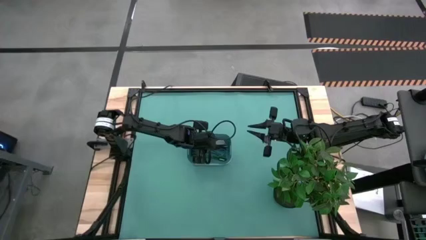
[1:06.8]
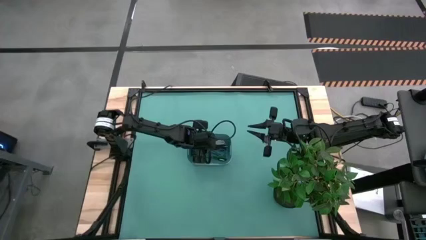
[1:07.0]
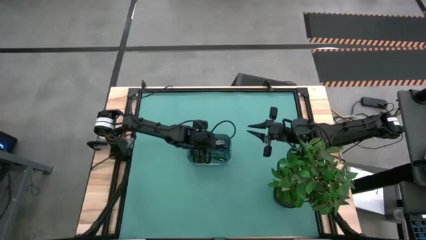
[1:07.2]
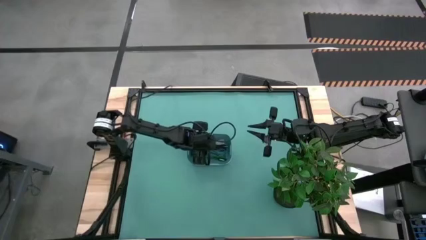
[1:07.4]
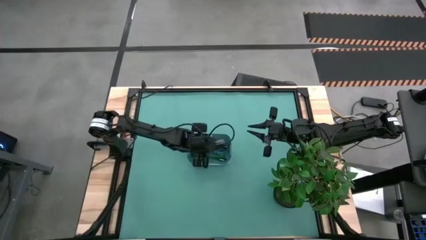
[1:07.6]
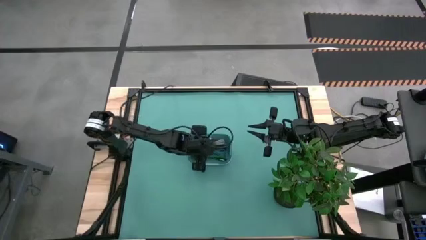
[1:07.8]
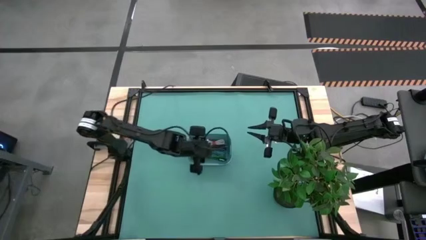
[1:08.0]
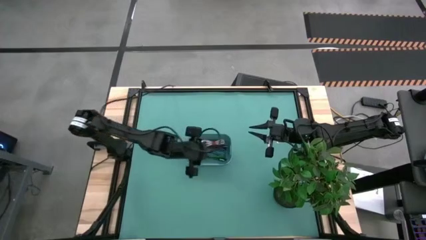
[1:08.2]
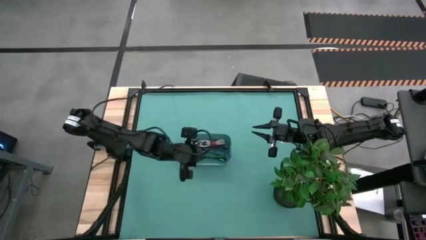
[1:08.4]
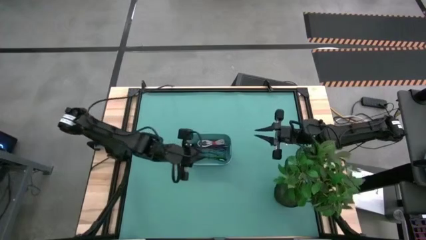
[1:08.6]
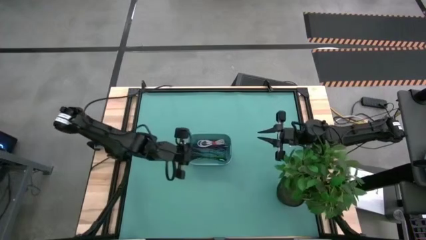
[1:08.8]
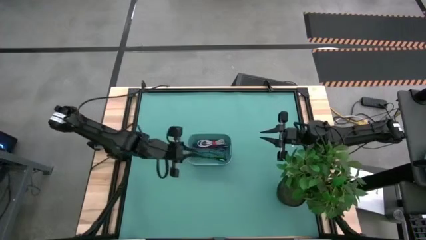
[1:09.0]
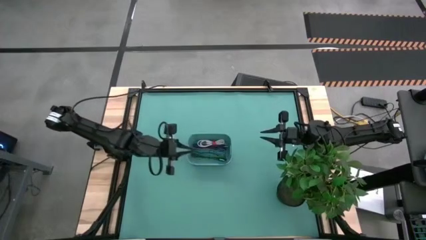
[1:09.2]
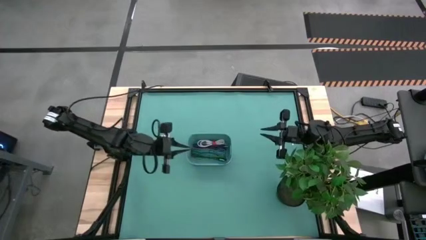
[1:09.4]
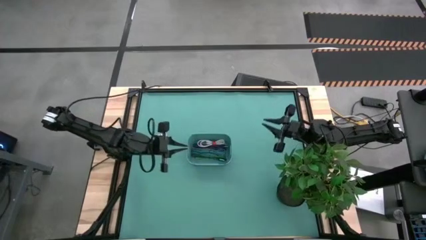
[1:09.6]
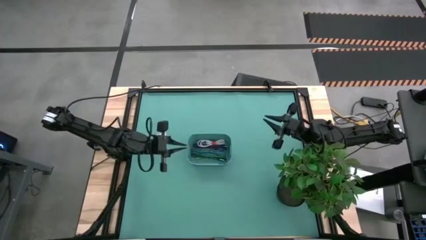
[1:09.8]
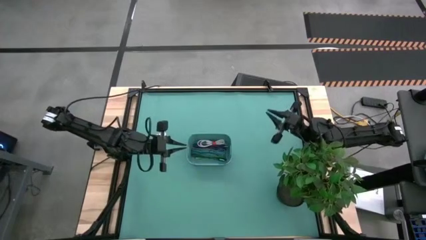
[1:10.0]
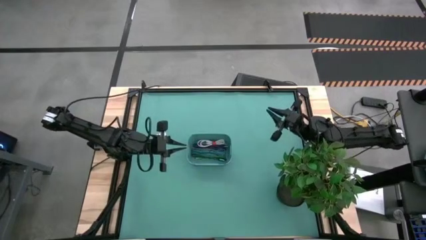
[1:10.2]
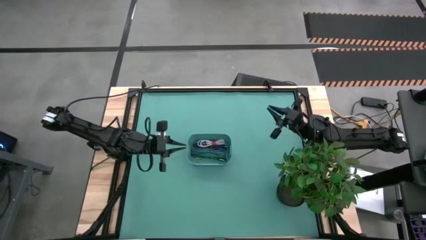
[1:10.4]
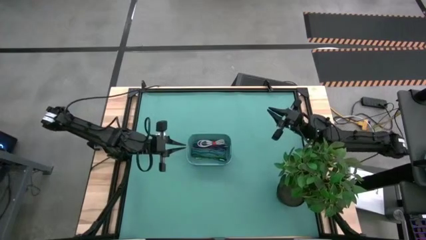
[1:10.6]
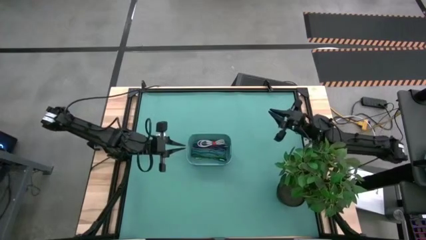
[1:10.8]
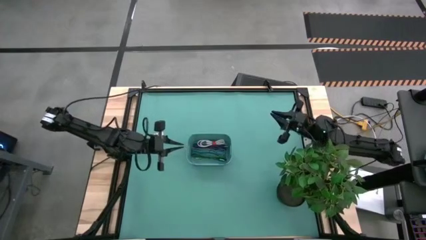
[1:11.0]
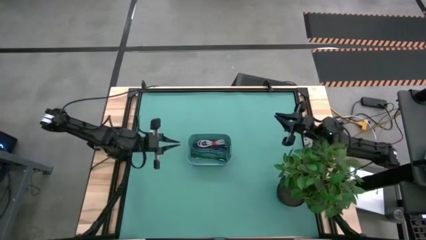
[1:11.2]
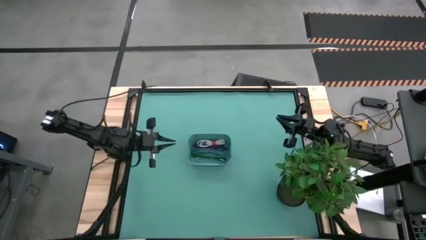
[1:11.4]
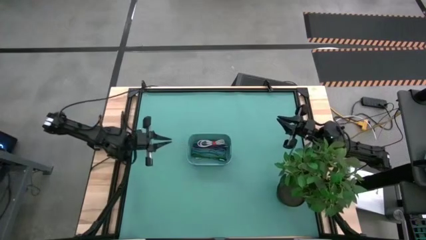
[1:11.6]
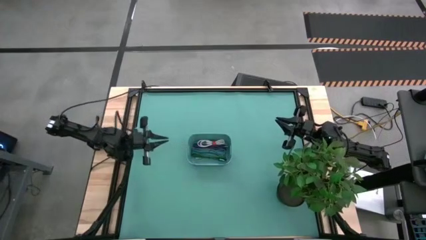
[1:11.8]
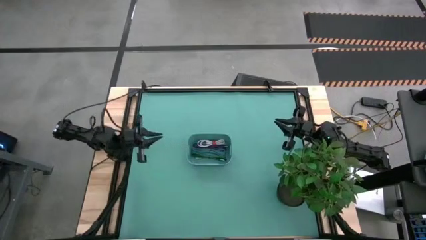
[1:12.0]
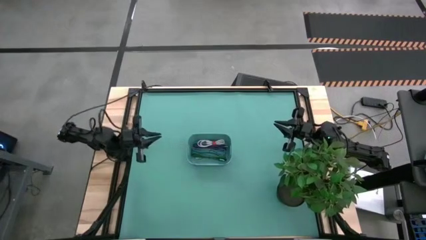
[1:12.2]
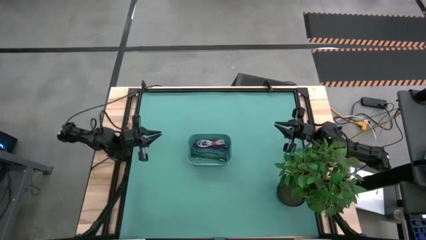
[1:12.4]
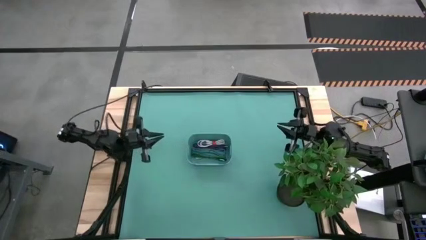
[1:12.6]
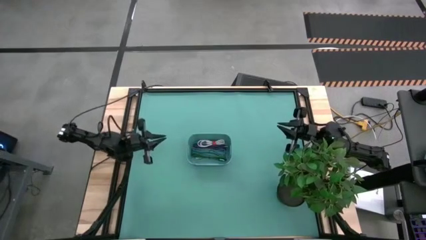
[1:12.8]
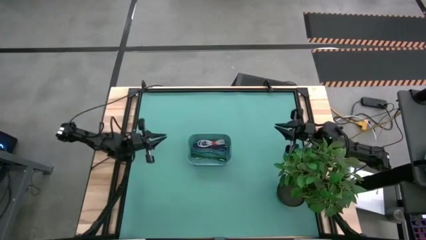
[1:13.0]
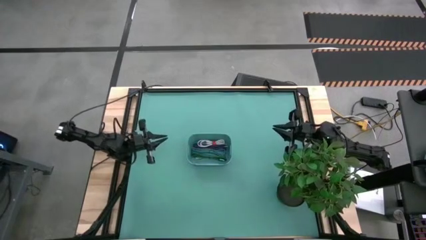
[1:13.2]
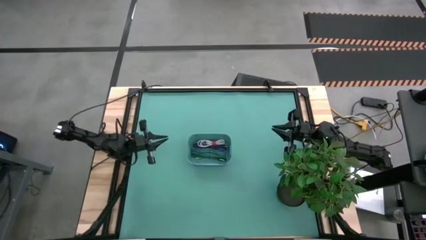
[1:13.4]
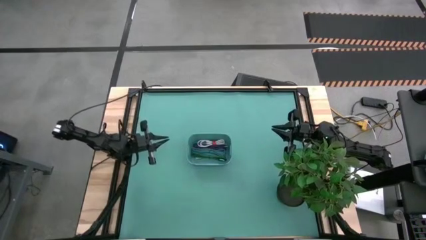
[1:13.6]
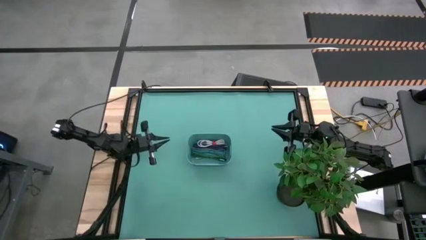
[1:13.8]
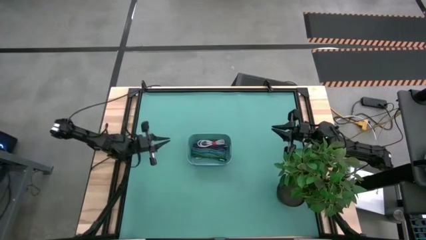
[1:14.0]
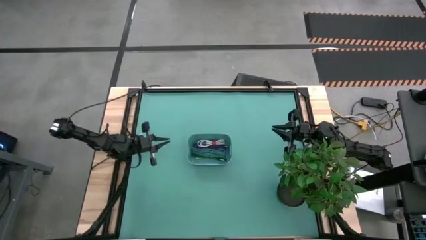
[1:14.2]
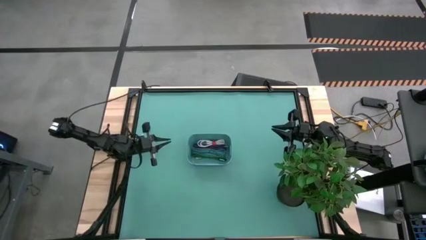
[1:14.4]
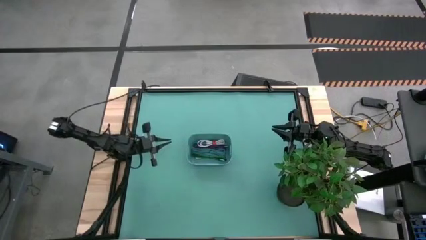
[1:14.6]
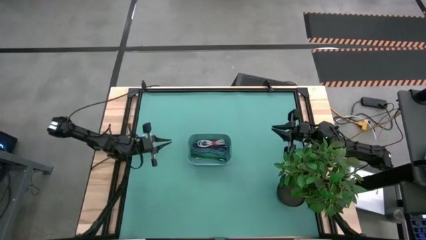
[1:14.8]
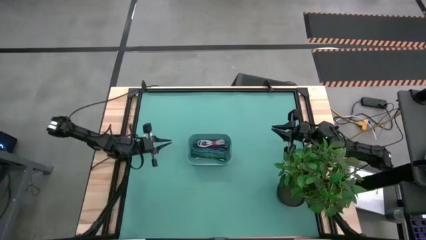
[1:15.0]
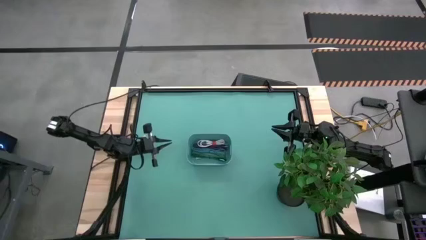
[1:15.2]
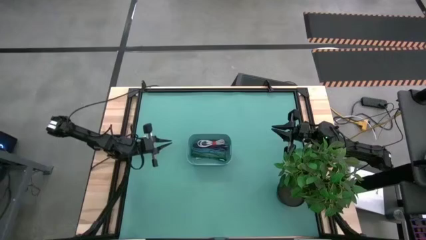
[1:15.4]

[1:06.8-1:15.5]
Task: Pick and place USB-C Cables
Return to Home Position

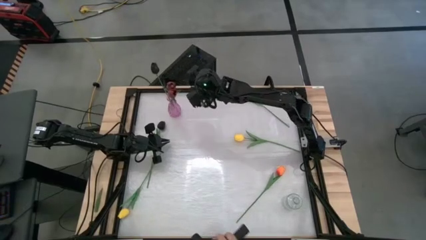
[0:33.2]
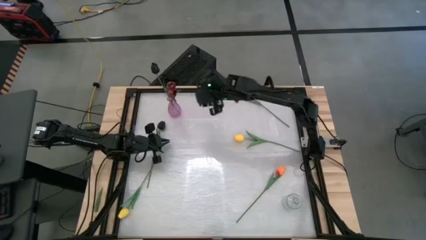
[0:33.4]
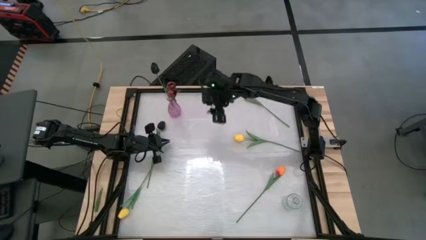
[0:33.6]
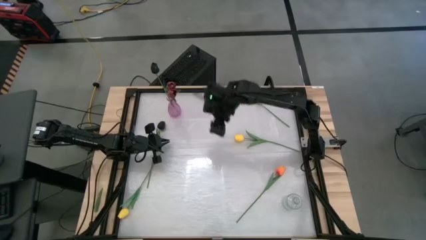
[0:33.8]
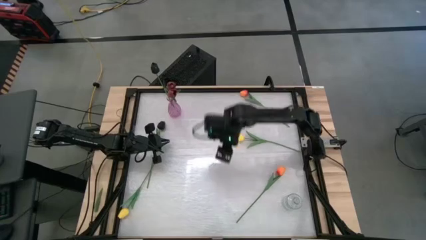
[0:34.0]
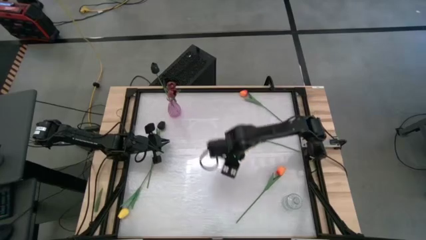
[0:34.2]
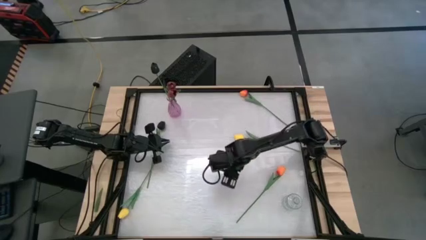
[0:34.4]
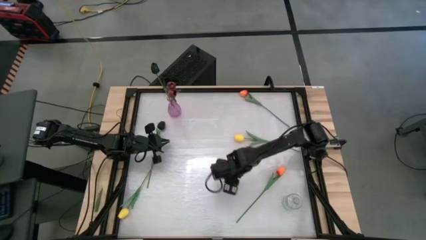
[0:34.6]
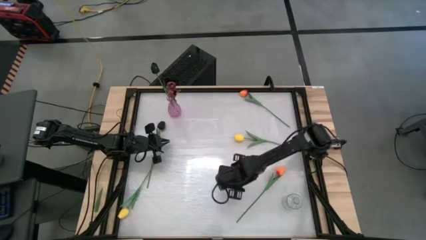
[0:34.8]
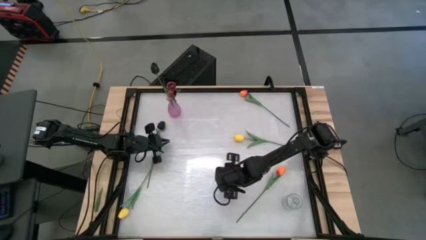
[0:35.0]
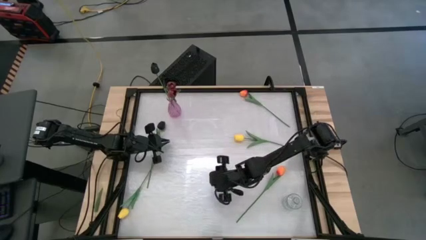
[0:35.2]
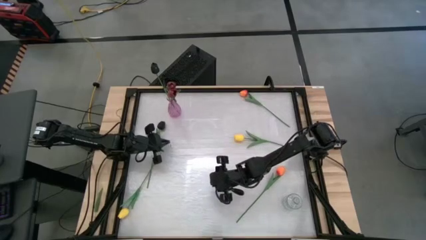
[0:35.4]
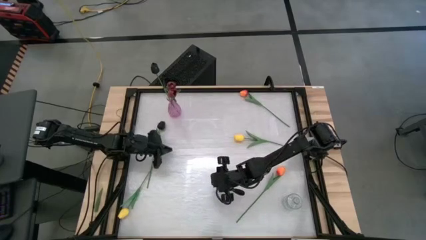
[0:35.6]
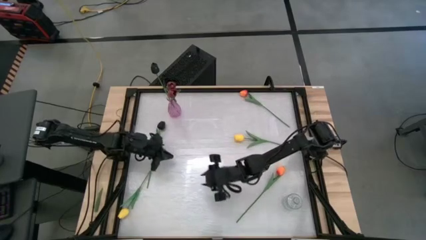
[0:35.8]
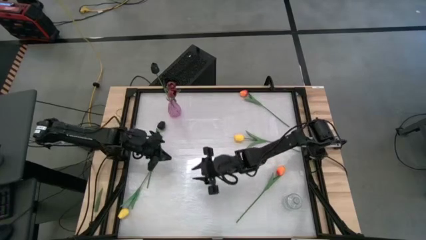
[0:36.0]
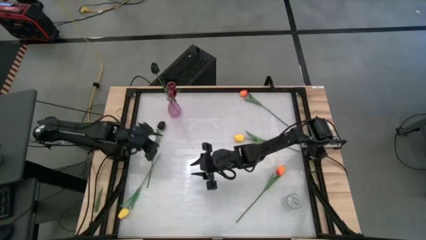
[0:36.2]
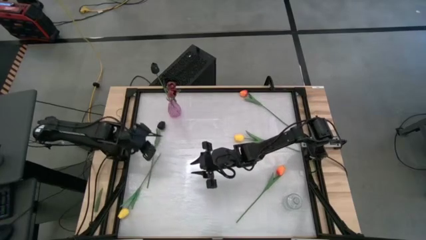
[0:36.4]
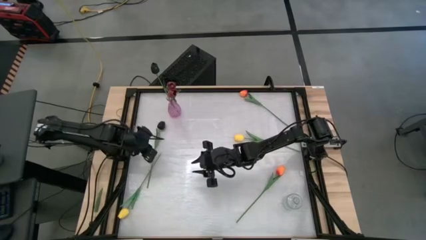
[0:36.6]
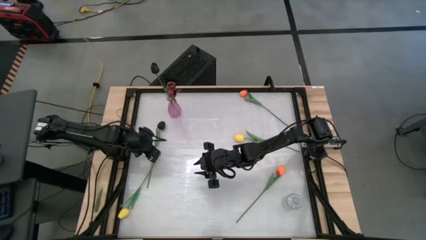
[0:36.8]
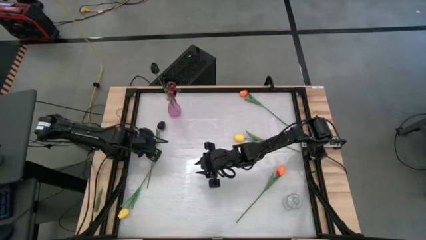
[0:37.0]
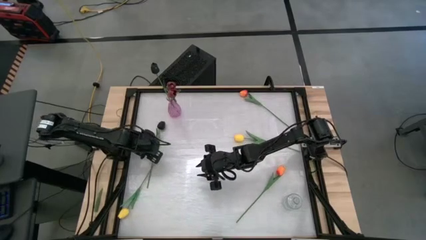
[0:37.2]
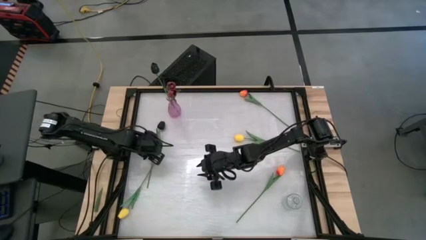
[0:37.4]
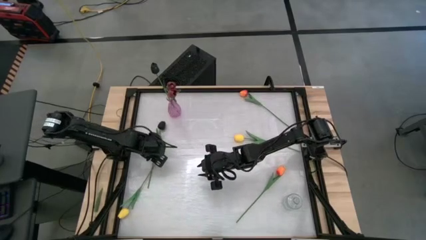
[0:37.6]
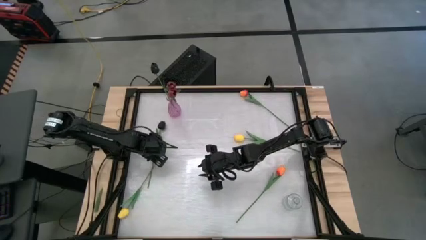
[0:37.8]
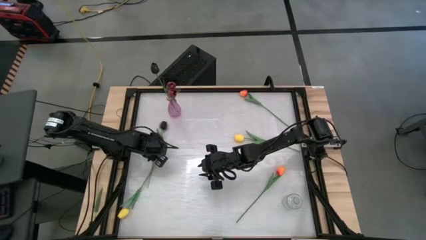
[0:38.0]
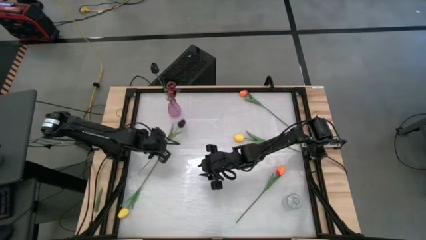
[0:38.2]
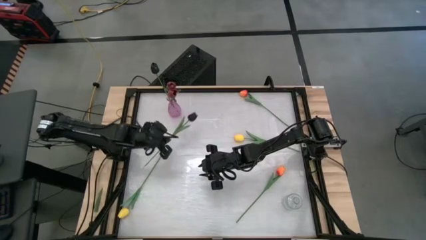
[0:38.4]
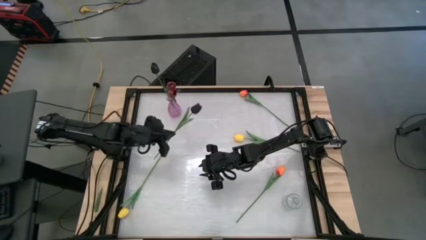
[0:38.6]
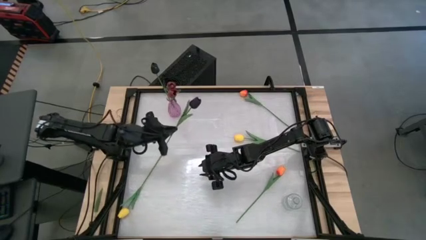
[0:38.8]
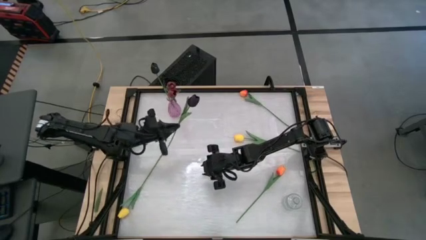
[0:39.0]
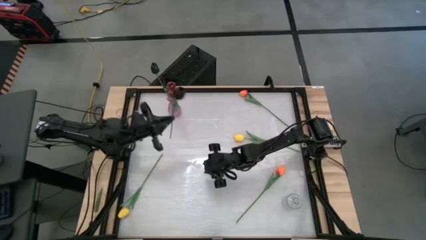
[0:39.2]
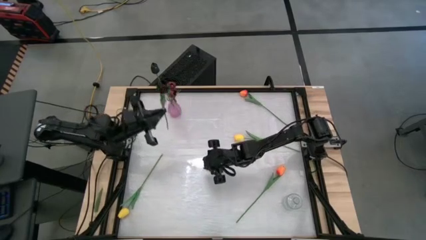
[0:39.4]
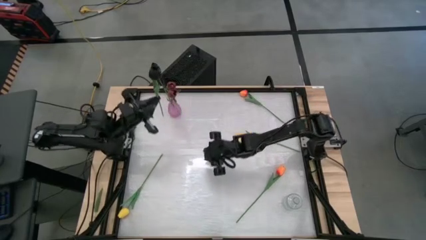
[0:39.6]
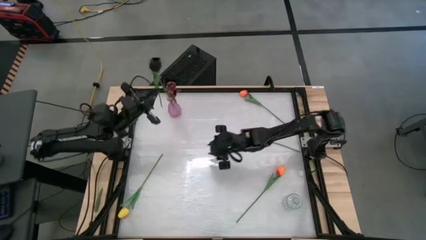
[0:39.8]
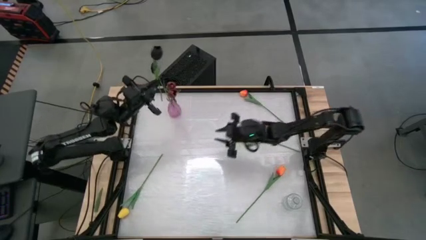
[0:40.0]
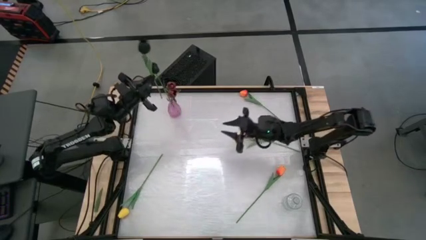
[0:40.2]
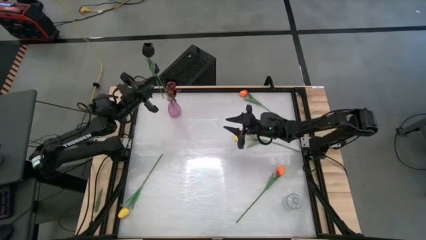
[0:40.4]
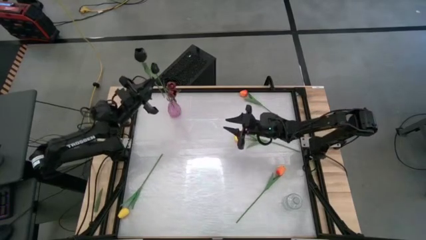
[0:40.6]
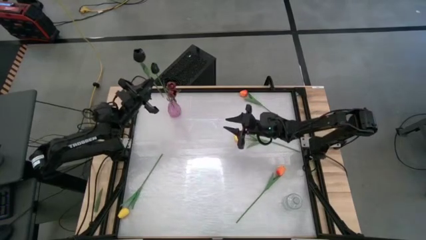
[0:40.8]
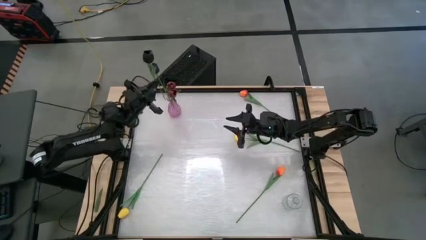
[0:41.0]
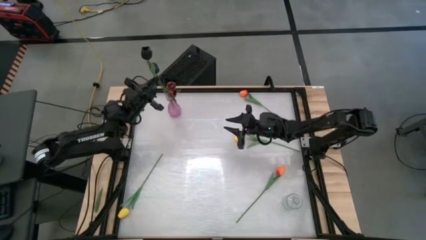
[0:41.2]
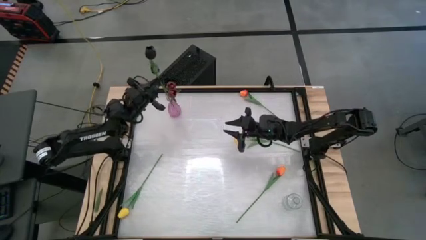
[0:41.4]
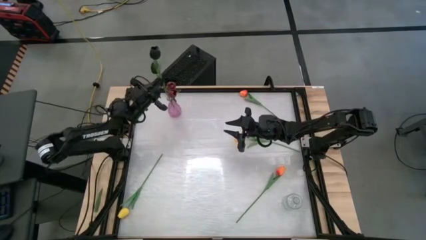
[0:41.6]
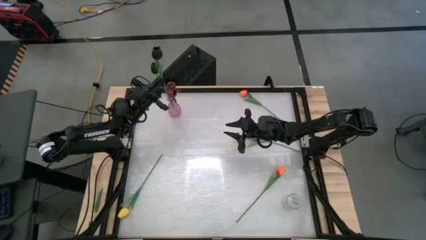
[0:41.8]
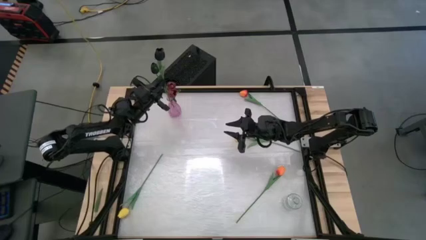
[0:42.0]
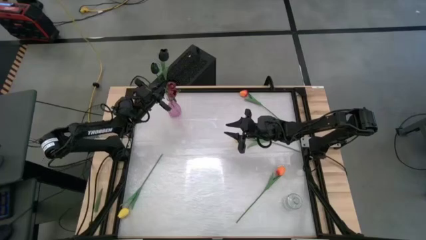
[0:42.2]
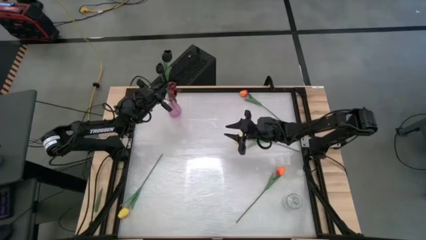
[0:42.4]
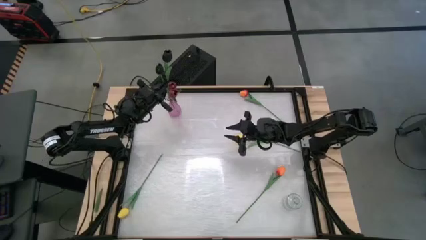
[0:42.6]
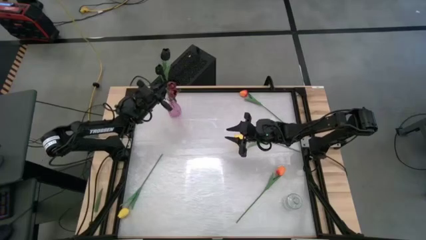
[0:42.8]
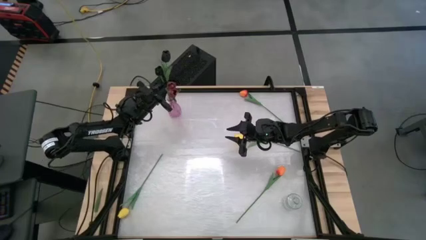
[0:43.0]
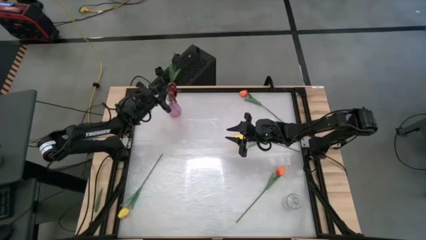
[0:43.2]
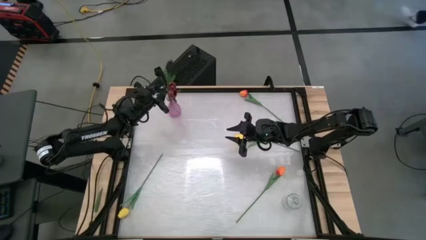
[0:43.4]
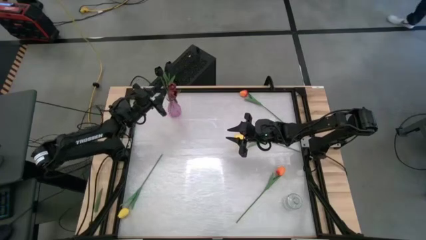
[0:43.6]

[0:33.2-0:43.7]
Task: Sort flowers into vase by color
Put the black flower into the purple vase
